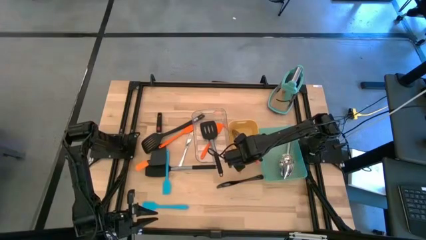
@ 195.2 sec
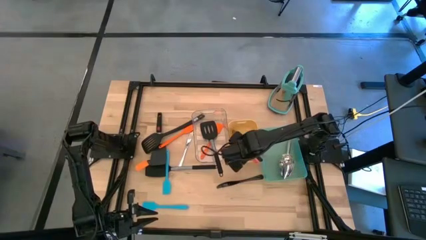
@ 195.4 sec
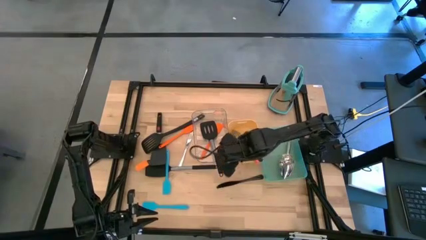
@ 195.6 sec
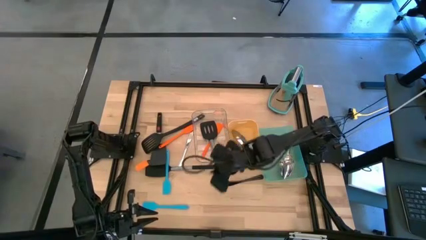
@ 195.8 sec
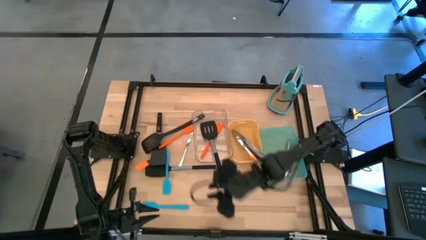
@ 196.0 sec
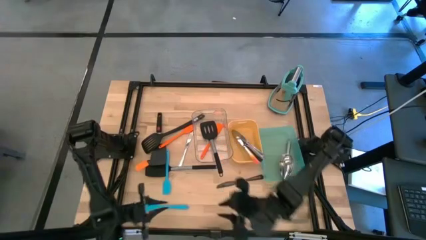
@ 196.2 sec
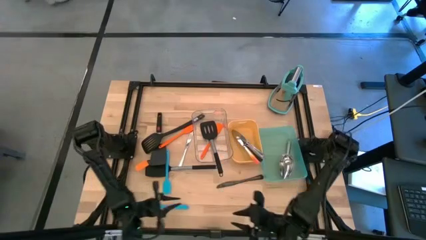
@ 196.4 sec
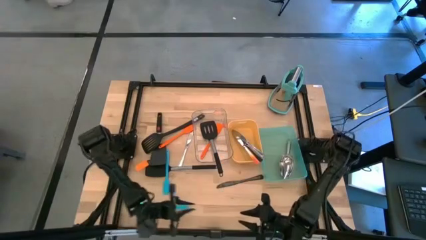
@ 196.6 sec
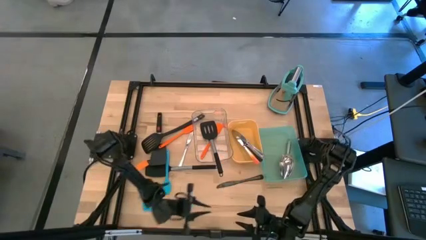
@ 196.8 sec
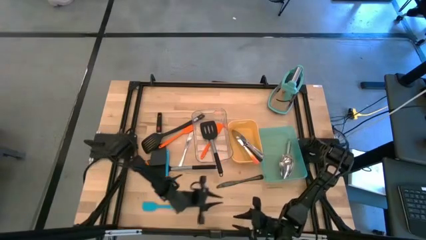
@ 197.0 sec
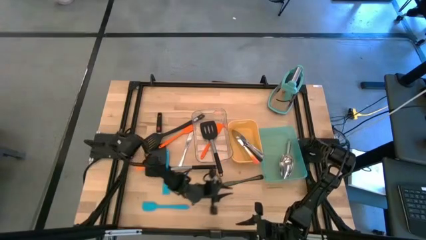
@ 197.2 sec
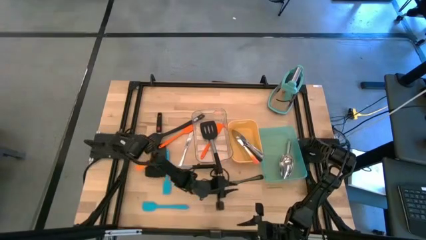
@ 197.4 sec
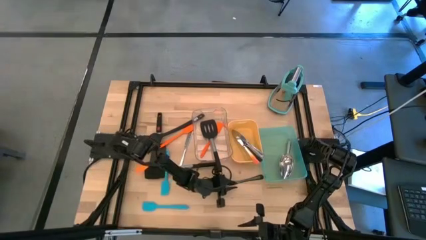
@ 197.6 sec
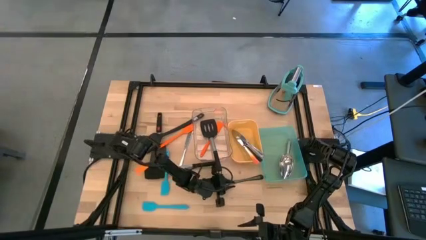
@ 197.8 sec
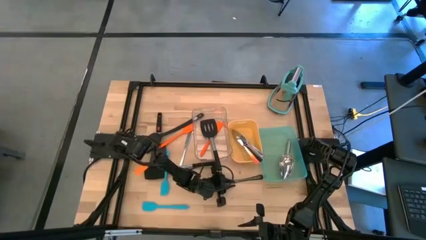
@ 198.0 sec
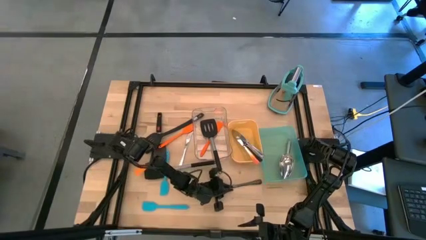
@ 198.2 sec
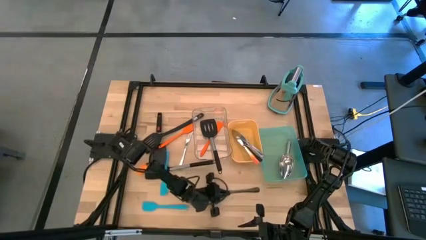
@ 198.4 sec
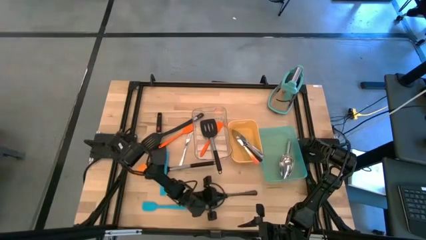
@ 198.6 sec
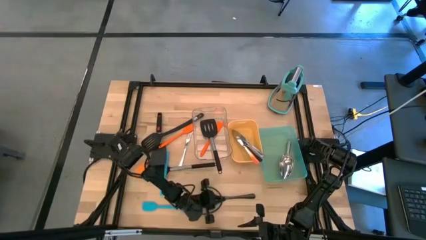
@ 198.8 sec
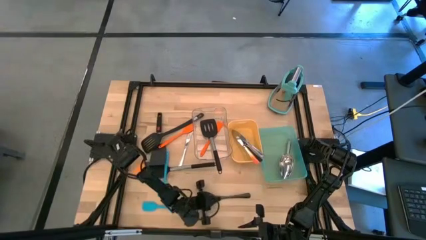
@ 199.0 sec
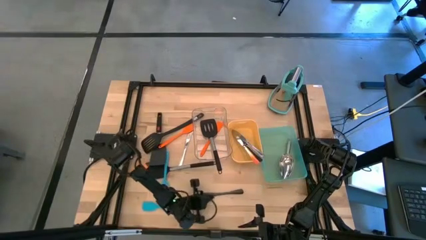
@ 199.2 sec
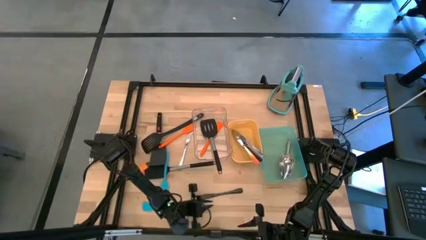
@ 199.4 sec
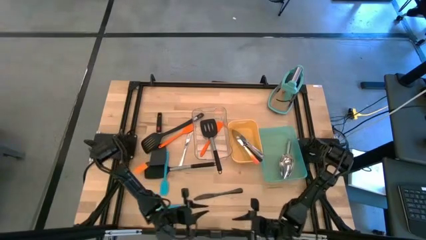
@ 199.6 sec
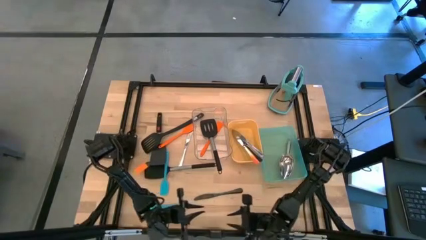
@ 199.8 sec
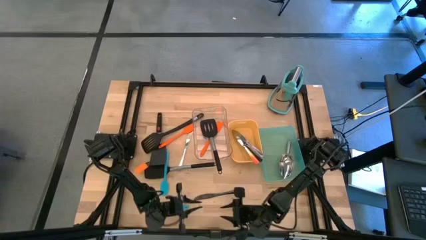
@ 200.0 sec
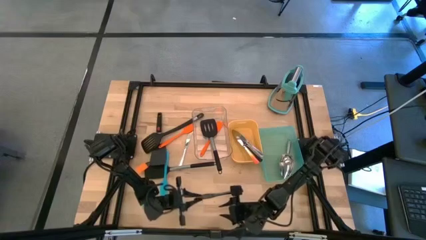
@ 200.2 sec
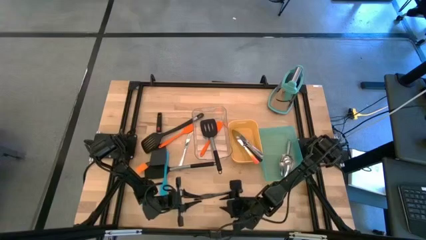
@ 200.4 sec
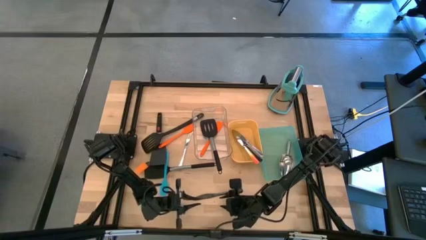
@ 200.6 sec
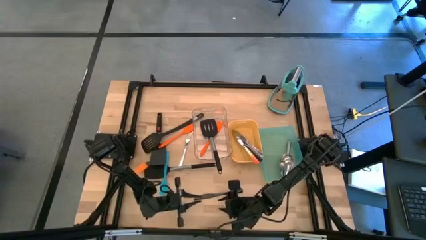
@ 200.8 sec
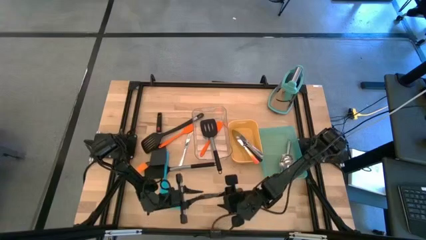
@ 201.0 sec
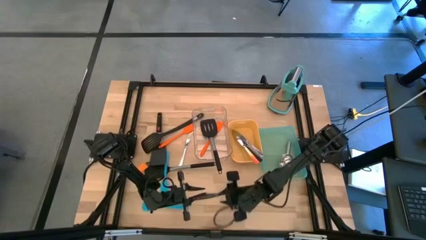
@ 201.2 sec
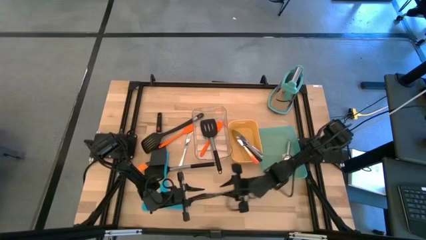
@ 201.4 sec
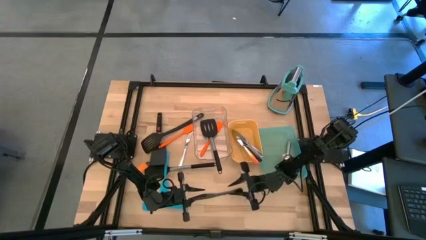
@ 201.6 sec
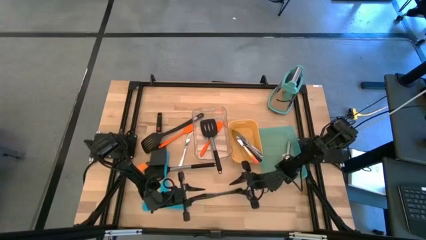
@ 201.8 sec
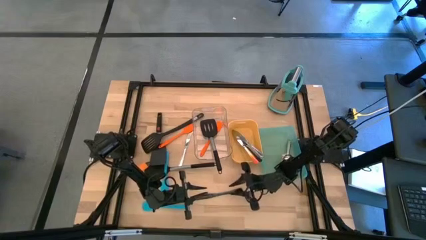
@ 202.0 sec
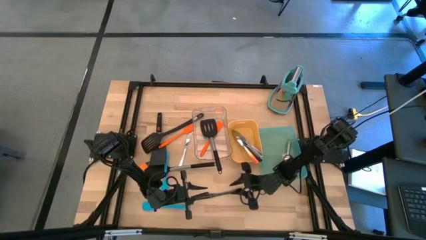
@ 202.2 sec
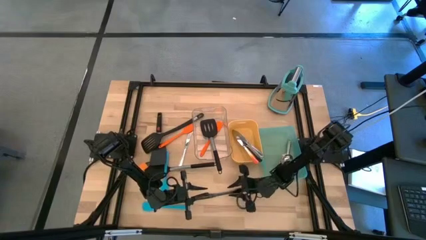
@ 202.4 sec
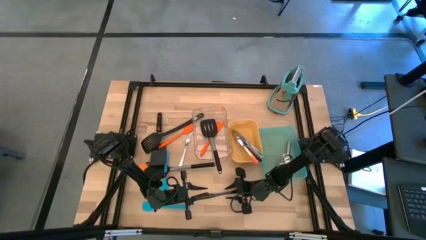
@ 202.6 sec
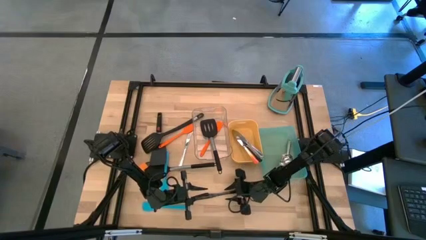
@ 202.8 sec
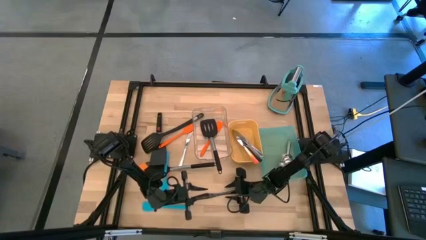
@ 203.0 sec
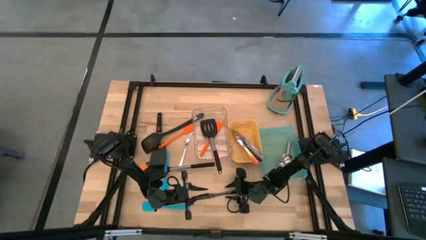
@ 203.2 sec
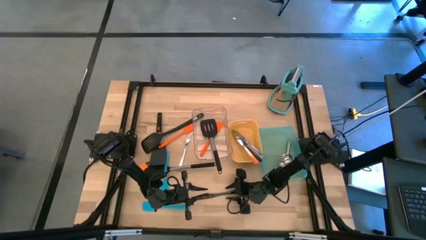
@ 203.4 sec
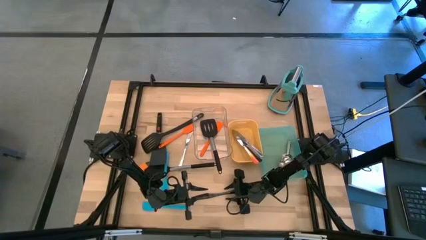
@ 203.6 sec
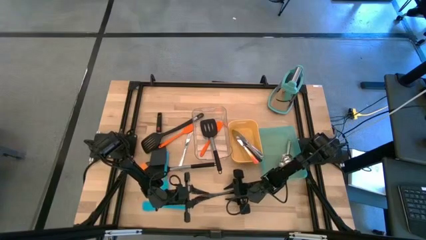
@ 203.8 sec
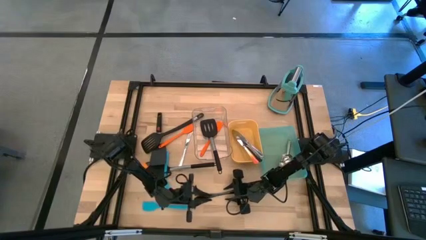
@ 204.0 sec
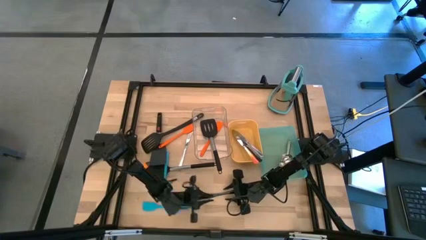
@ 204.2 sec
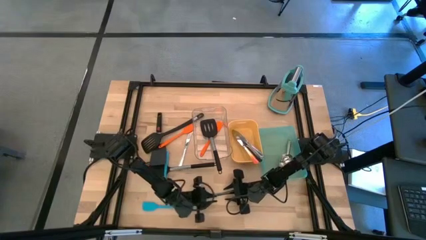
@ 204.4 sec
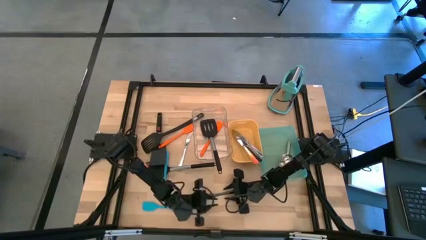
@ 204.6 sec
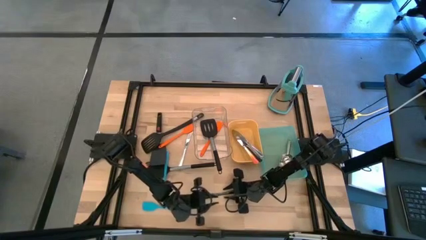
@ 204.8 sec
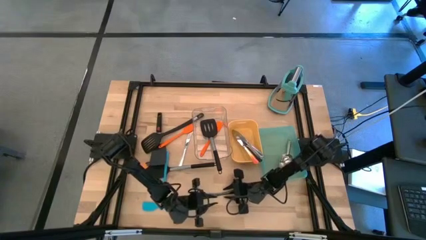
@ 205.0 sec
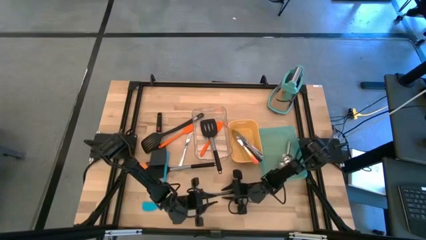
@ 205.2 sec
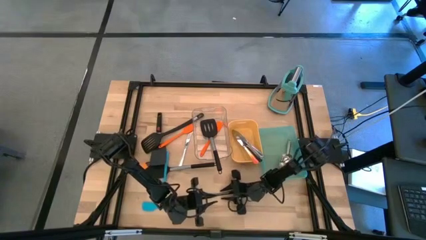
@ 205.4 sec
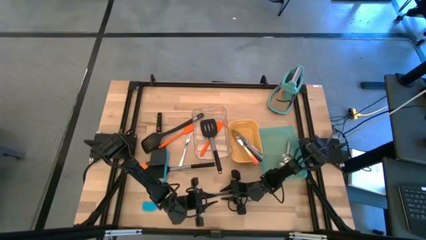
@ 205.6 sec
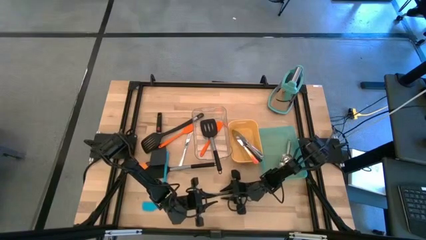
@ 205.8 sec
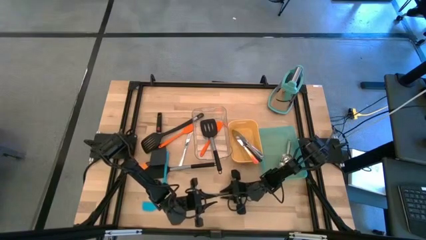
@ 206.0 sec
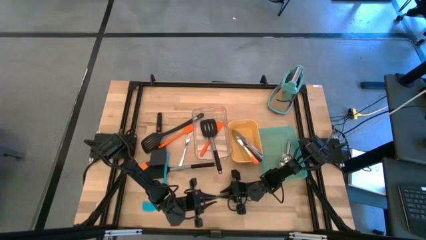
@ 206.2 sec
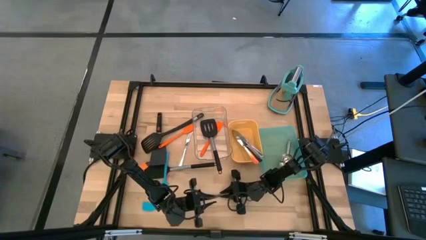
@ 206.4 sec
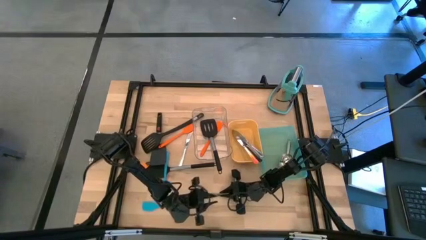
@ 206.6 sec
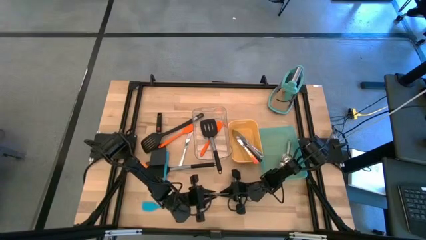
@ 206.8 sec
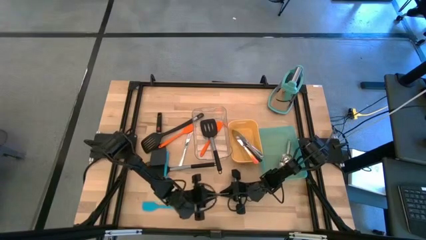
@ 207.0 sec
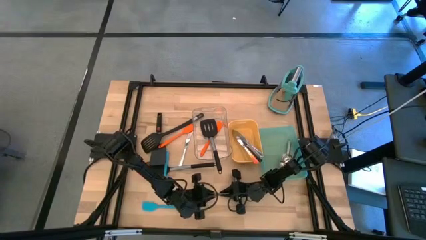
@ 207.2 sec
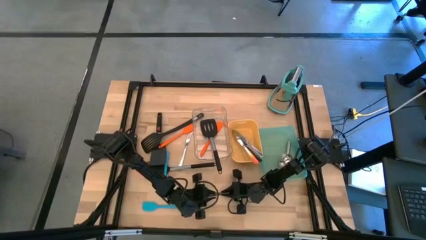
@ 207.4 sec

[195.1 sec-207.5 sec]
Task: Pick & Place Kitchen Items
Put the black table knife into the yellow bin
